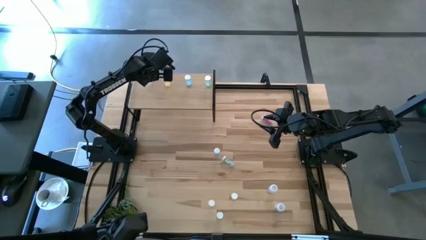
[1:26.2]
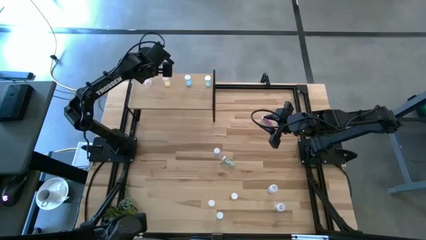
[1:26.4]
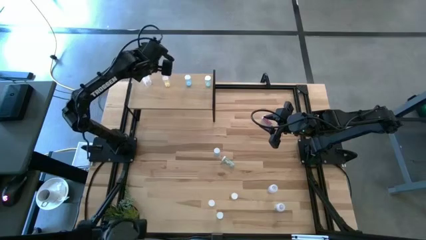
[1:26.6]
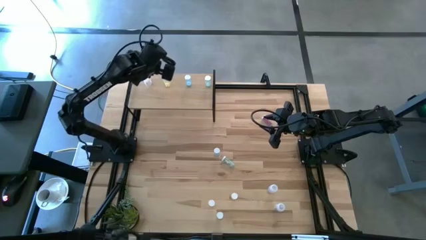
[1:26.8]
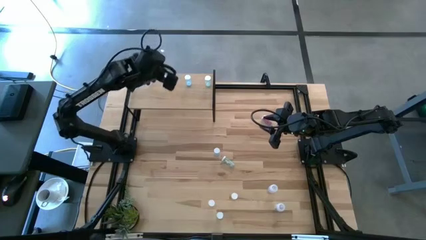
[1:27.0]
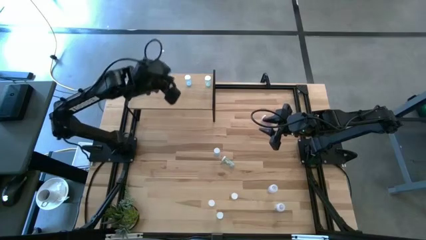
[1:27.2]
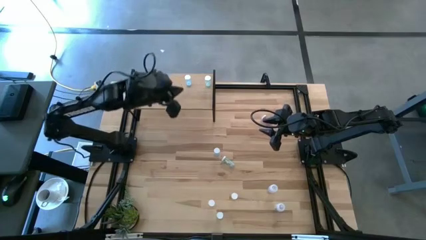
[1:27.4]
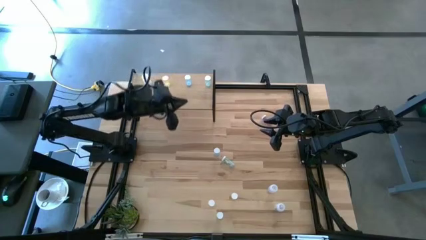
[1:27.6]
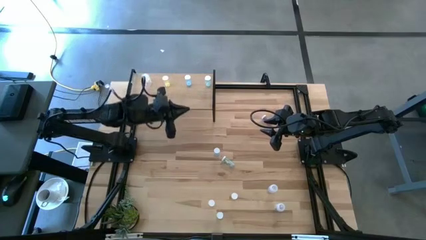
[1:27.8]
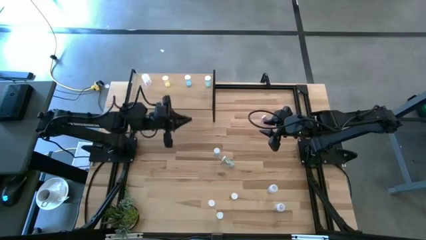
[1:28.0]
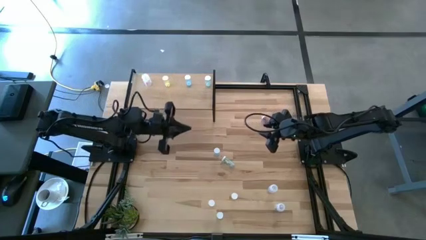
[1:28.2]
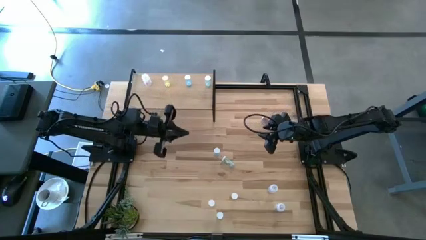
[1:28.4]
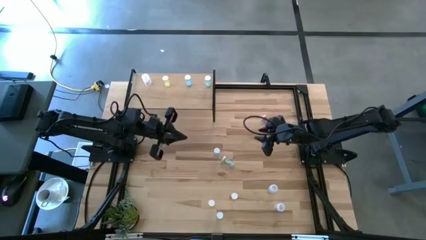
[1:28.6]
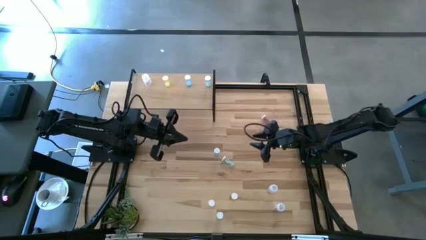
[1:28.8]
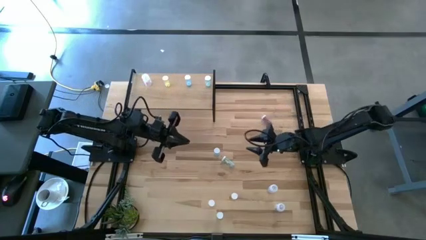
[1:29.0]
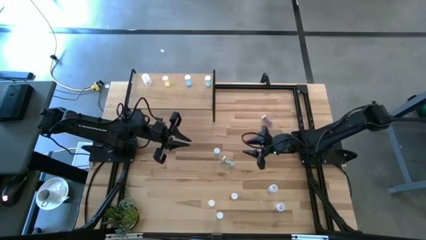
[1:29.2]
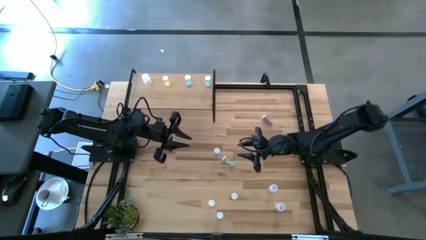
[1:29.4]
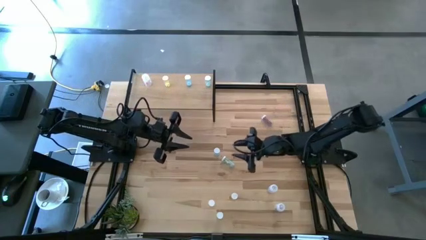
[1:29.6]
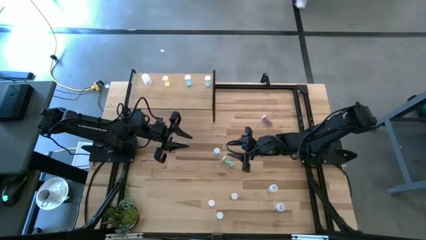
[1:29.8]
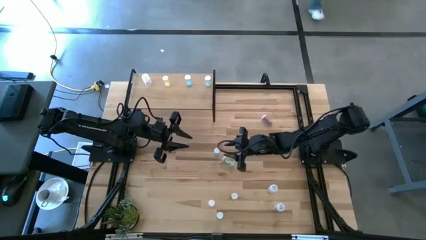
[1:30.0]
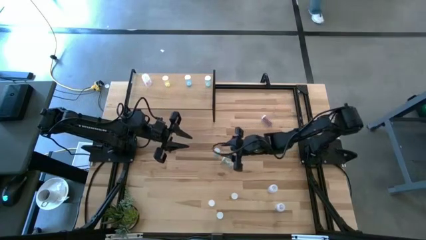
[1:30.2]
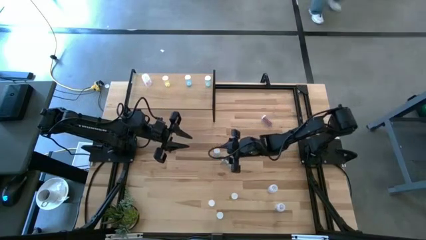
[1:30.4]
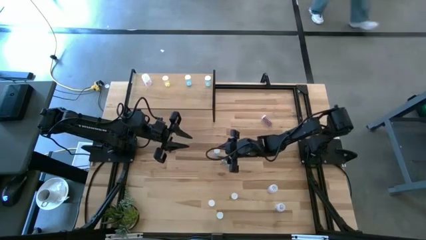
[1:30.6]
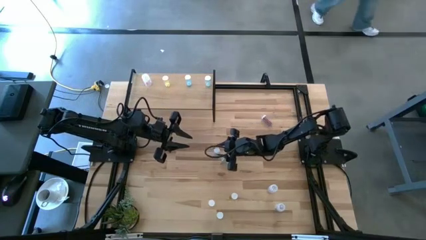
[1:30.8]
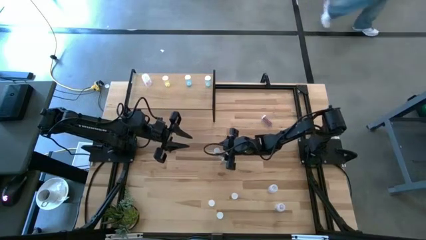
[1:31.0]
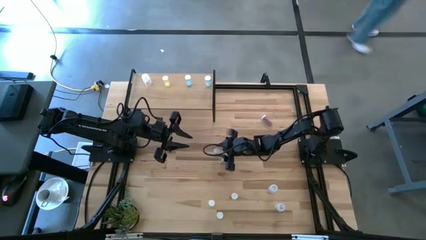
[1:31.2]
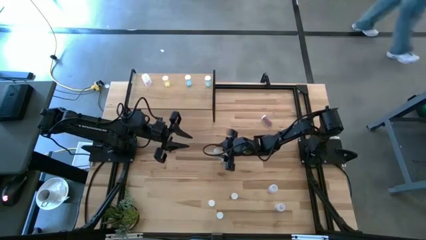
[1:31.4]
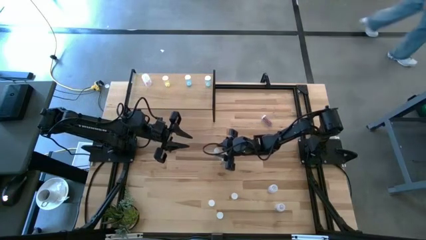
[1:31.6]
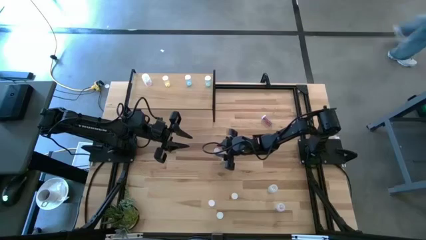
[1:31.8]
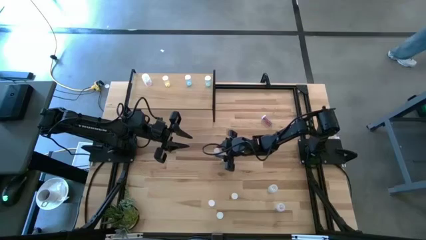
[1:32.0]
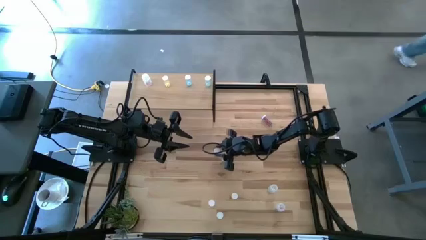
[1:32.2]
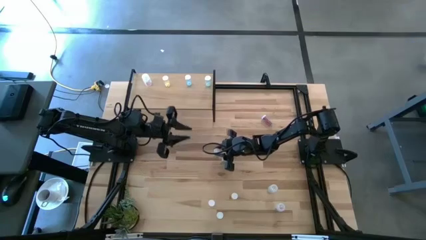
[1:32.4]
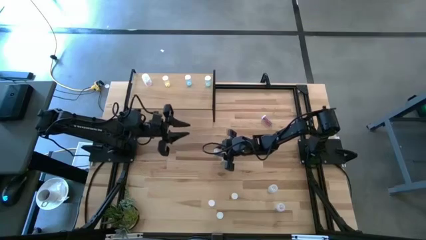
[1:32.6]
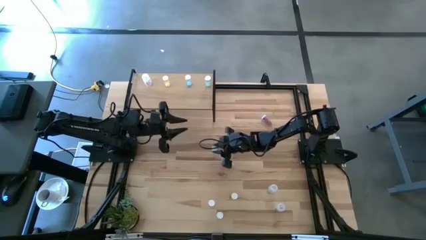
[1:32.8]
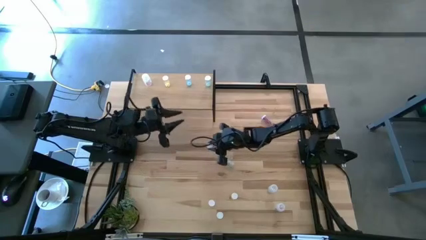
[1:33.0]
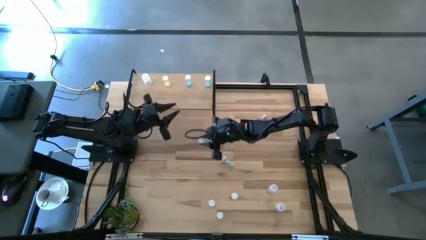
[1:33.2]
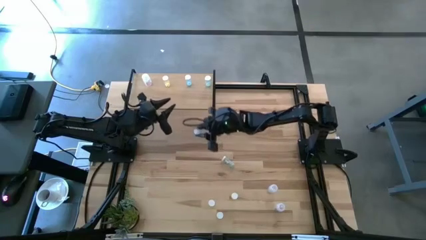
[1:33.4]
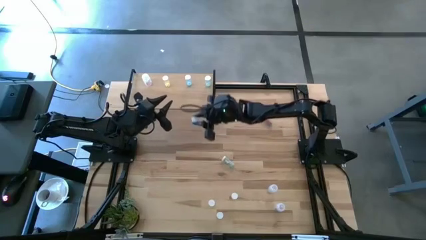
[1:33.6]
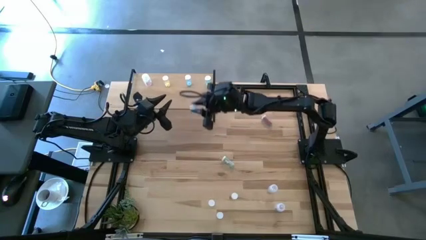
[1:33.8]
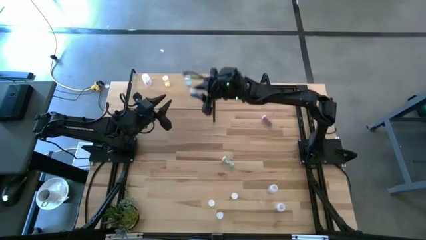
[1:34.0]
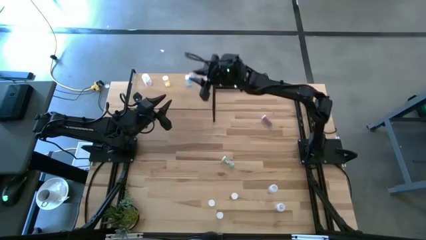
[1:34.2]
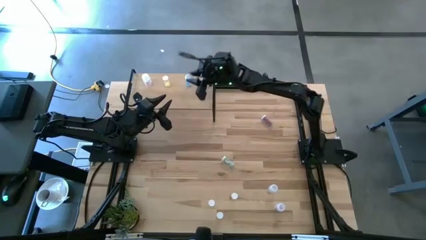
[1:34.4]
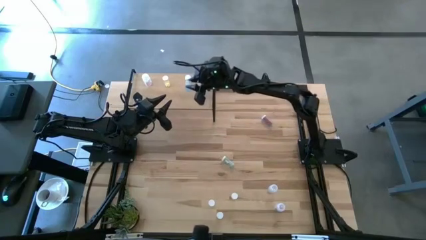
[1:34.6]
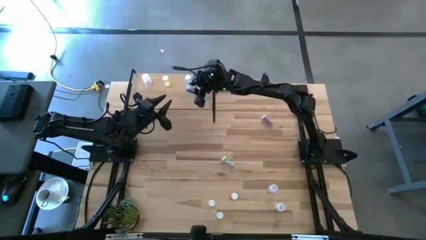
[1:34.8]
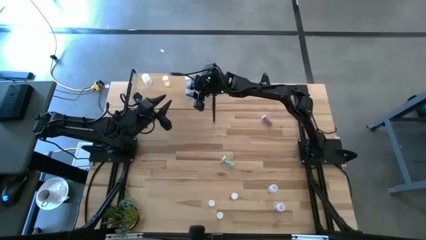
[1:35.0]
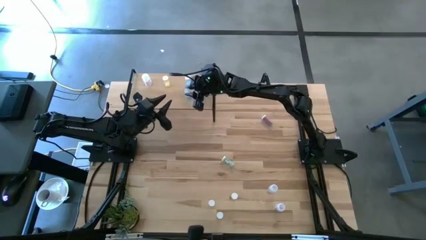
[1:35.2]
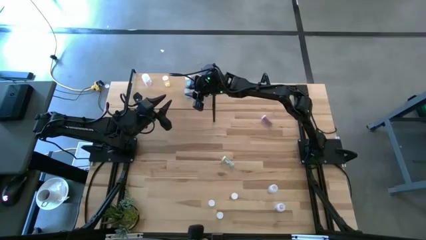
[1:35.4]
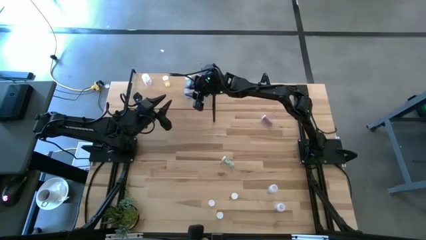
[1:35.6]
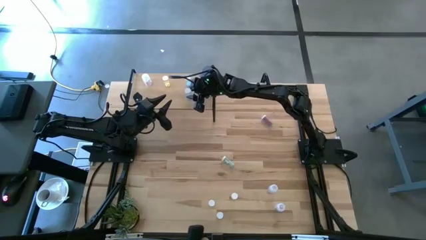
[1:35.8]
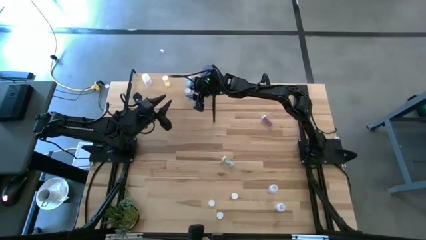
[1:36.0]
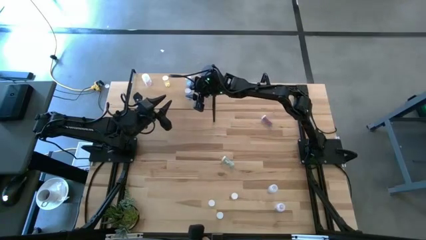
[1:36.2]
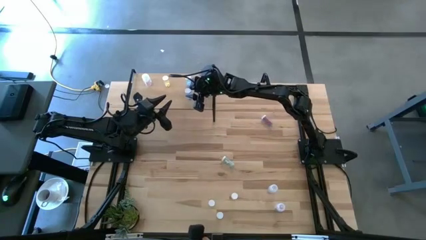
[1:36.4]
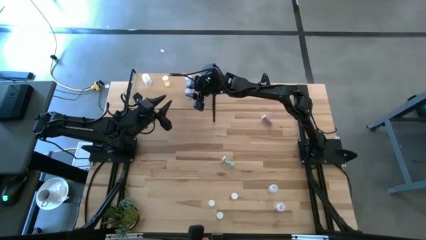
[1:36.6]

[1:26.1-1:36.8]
Task: Pick and place medicine bottles onto shelf by color
Put the bottom blue pill bottle on the shelf aligned with the other blue pill bottle
